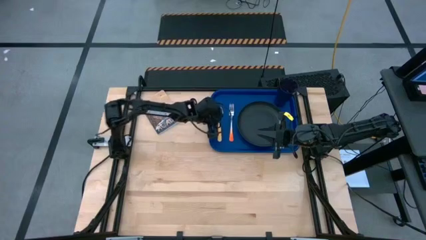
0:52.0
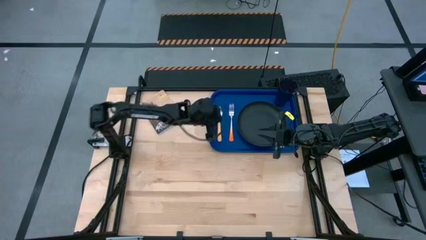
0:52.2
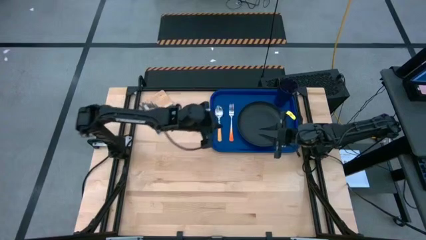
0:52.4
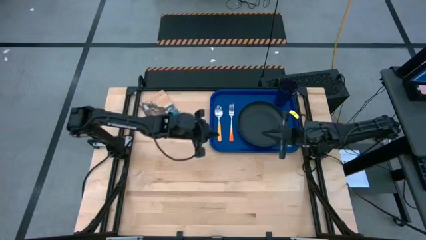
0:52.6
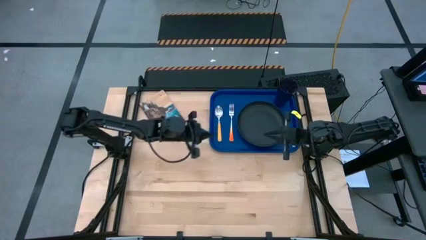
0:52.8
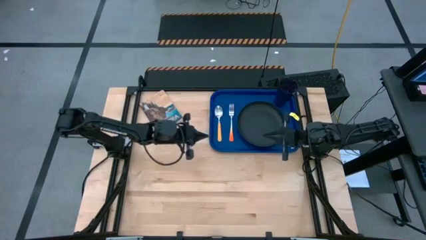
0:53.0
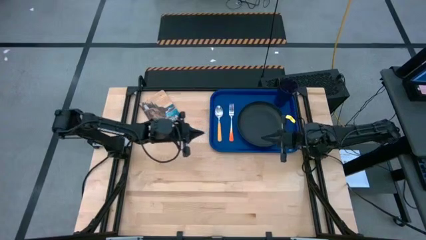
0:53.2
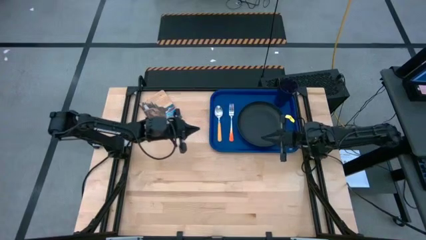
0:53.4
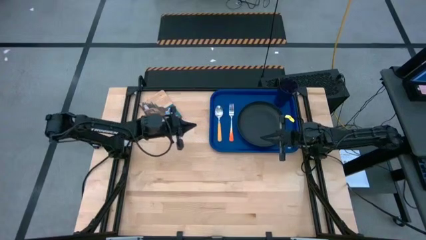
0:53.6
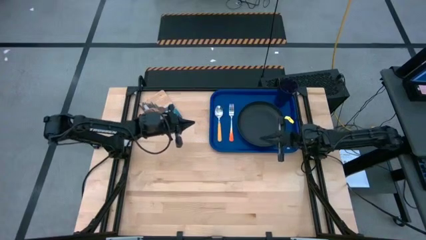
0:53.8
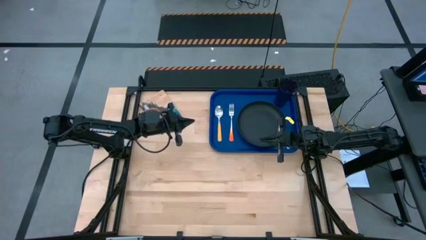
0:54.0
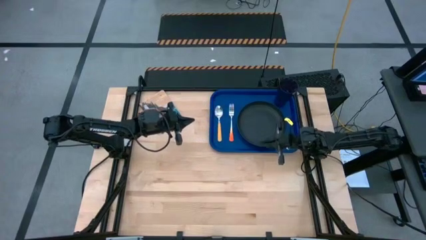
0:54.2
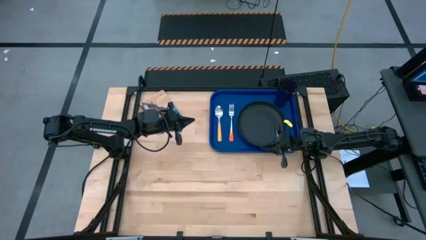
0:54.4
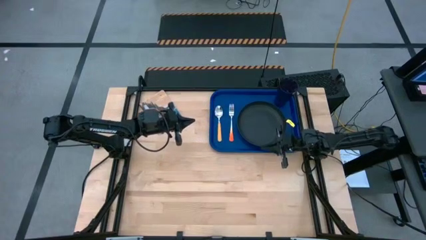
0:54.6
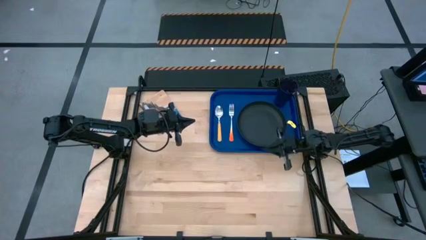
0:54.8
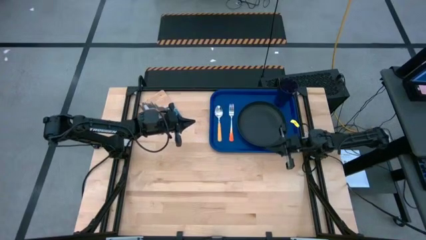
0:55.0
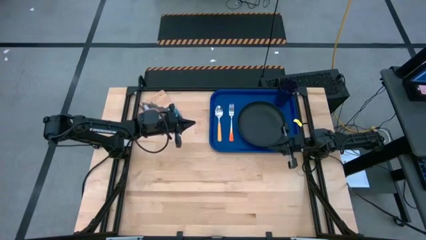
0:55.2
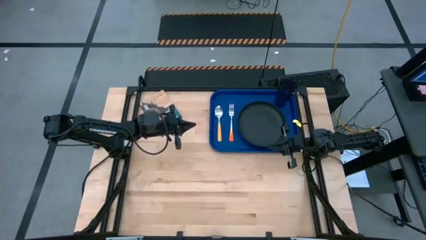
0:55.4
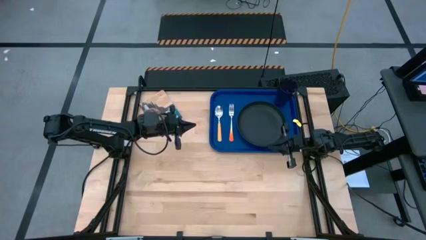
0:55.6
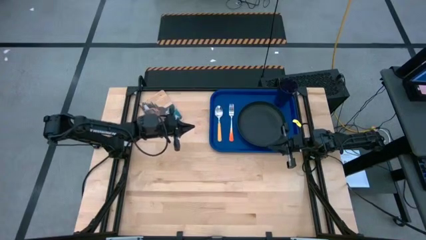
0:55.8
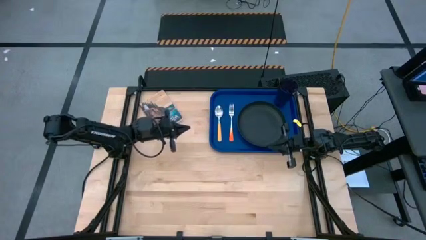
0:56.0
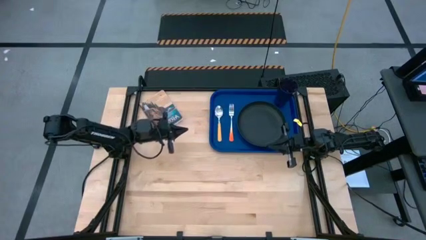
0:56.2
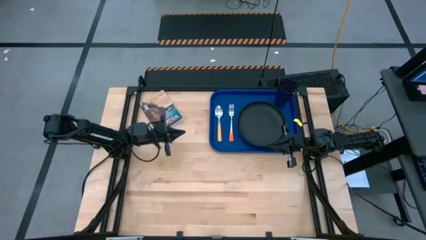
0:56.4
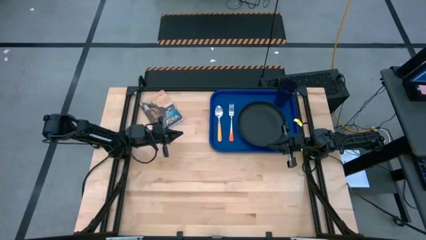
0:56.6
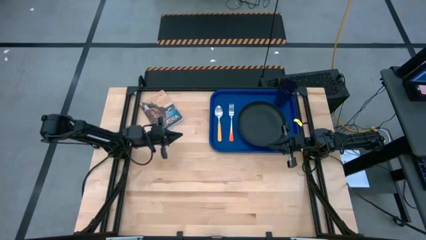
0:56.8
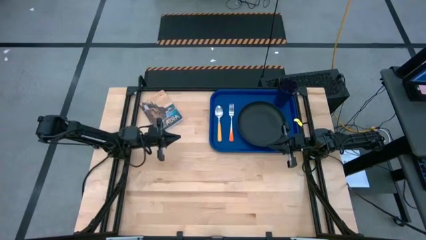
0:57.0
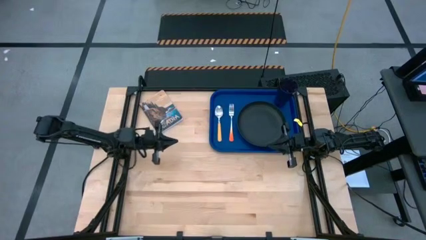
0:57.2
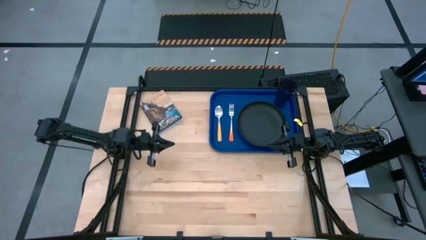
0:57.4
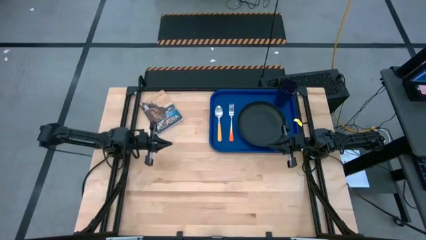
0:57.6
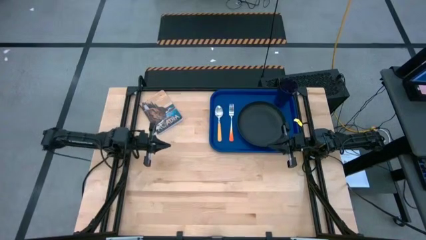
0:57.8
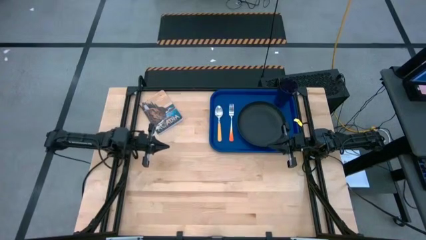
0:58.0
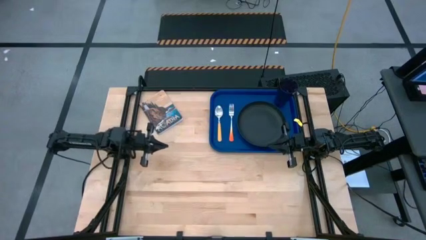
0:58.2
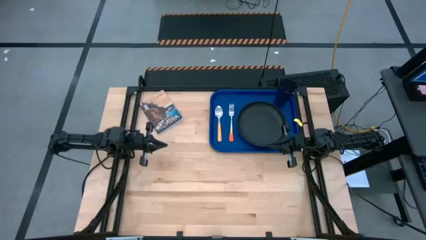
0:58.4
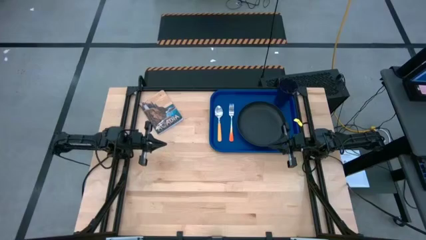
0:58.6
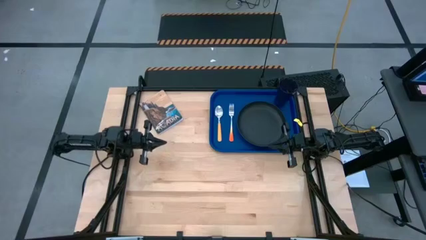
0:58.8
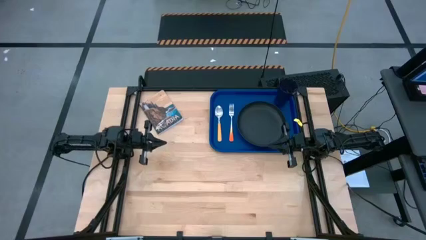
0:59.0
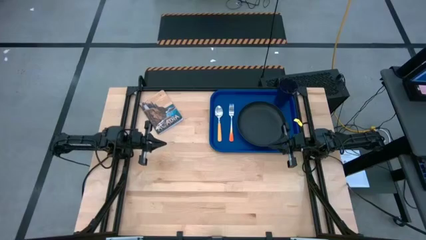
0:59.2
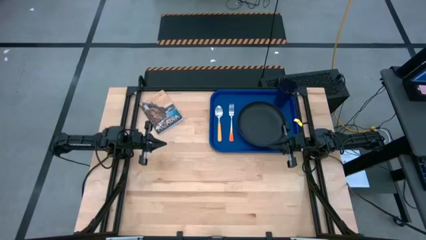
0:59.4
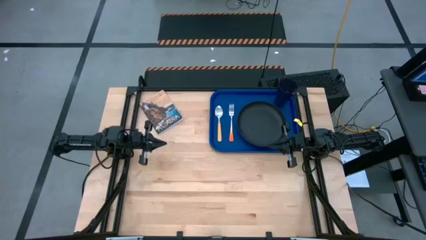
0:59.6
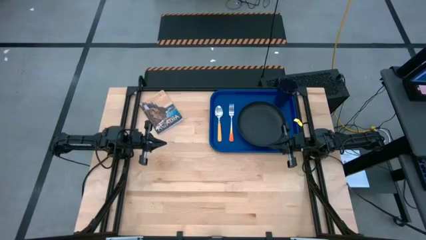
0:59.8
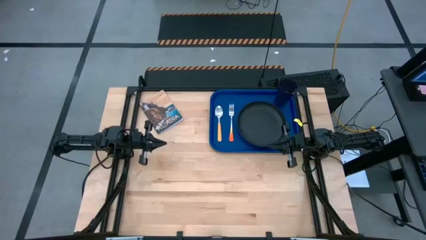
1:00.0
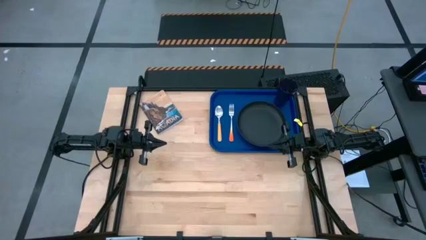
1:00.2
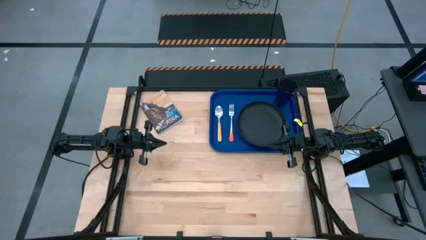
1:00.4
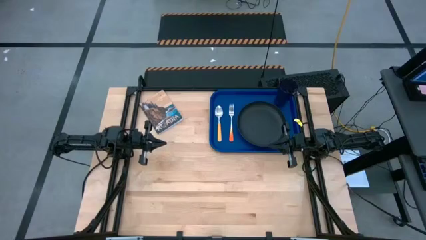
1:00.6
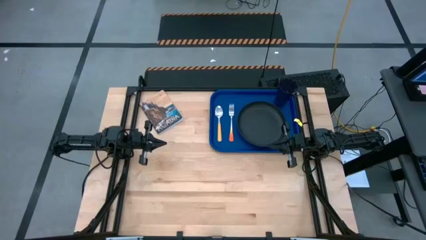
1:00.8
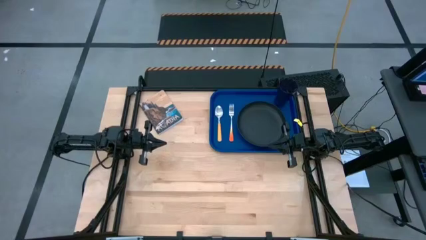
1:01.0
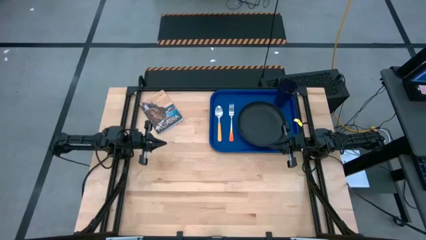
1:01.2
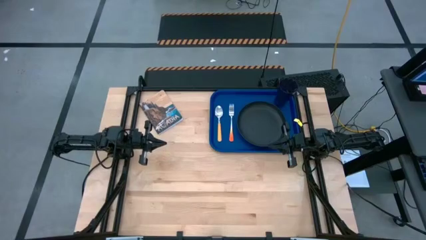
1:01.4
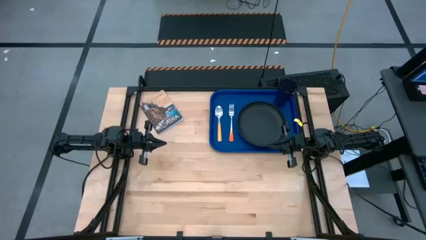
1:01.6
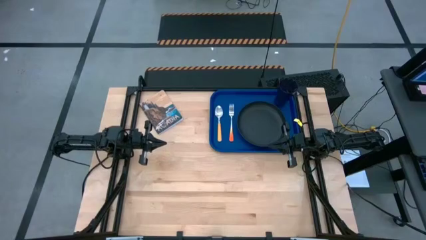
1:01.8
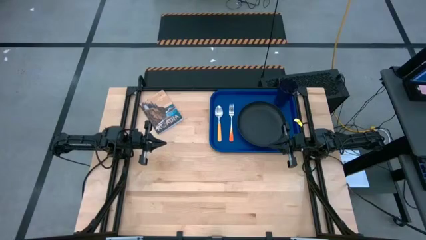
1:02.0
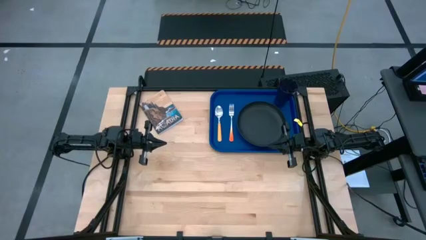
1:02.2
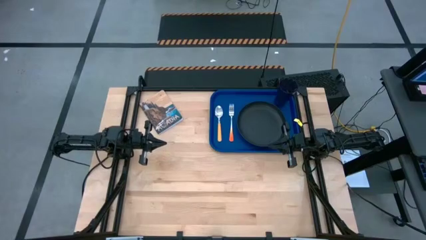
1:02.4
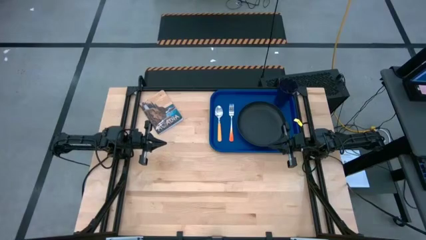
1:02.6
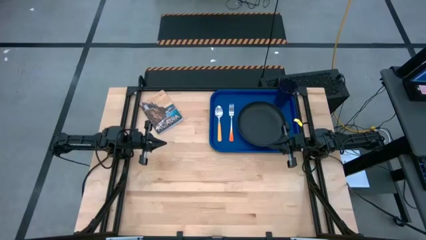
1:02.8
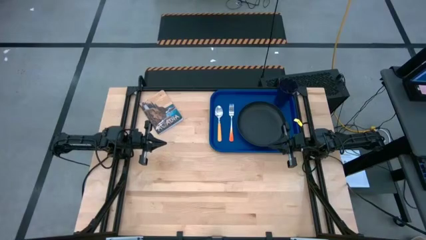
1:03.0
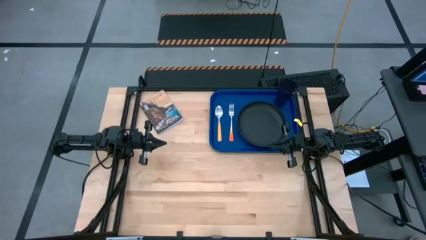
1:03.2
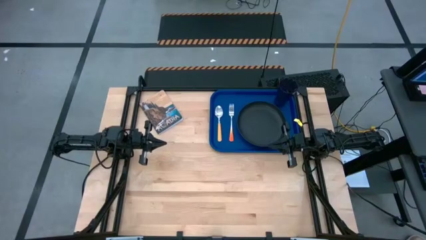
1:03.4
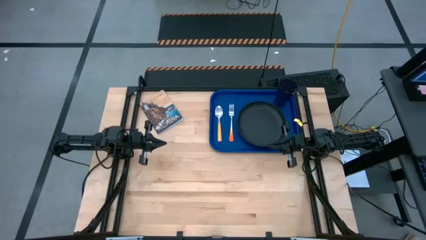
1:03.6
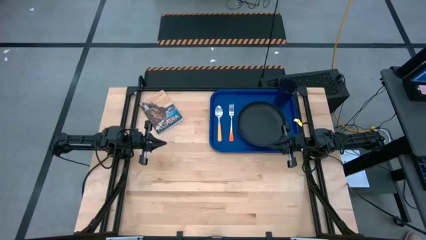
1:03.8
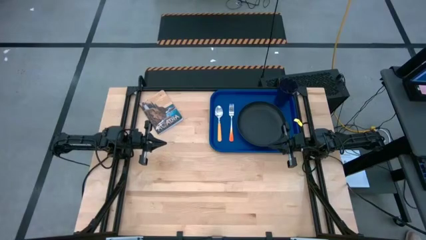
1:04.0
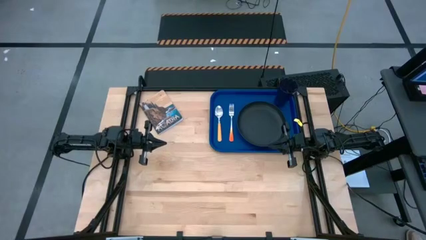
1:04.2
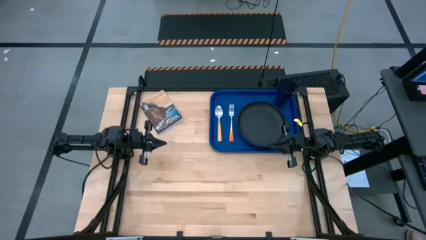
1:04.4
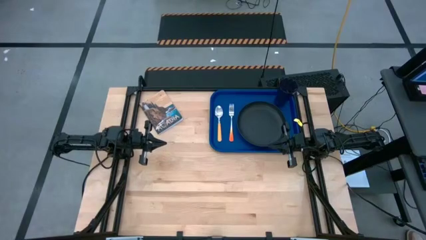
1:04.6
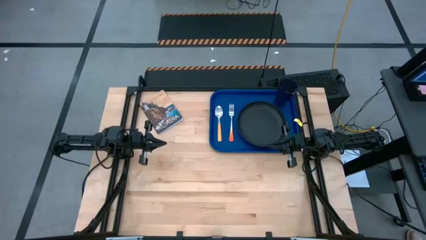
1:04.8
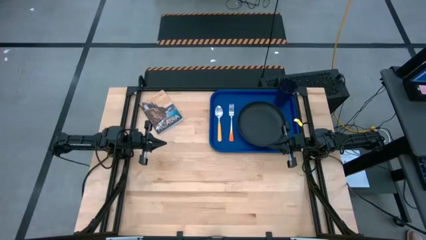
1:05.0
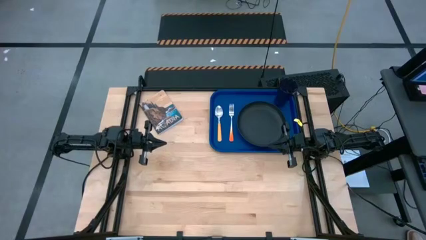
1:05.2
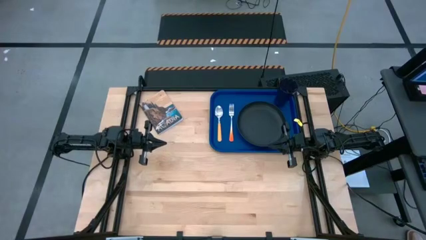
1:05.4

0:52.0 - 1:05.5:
Task: Pick and place plate/cup/fork/spoon on tray
Return to Home Position

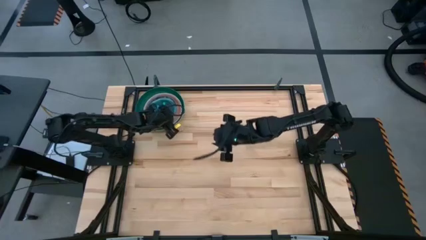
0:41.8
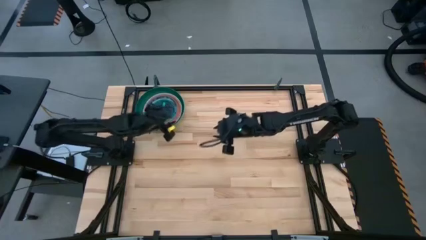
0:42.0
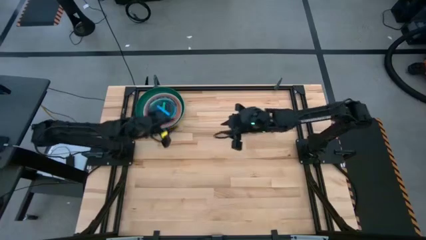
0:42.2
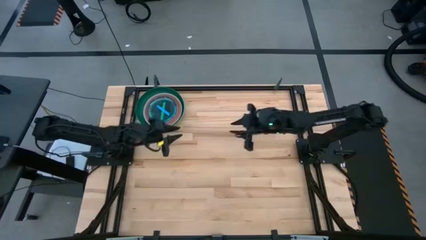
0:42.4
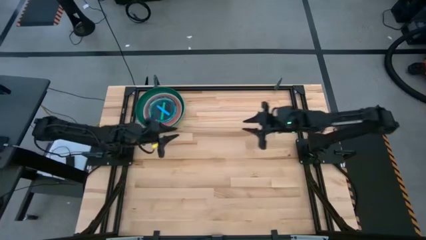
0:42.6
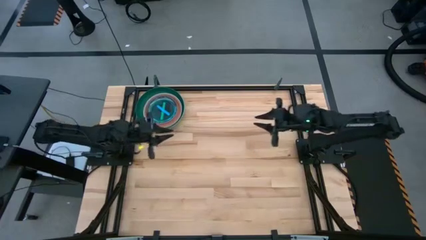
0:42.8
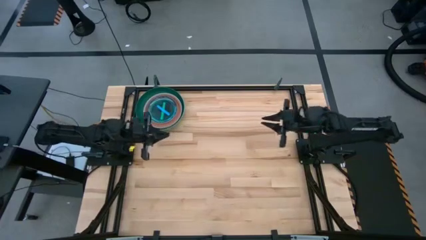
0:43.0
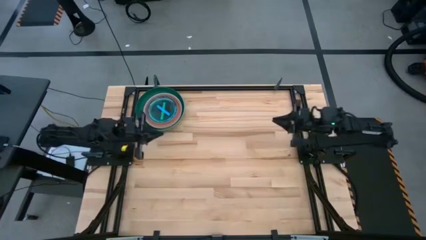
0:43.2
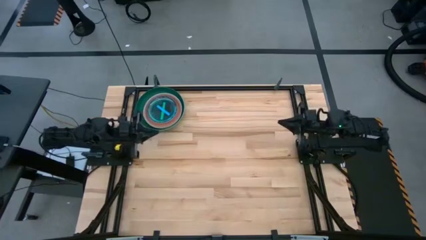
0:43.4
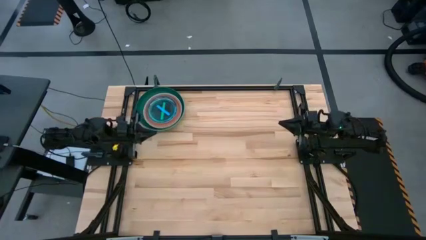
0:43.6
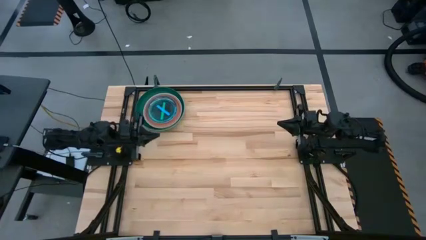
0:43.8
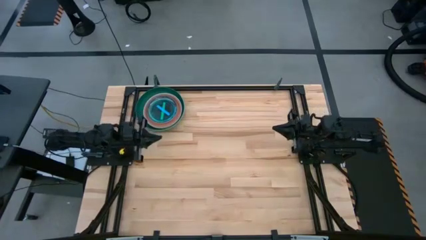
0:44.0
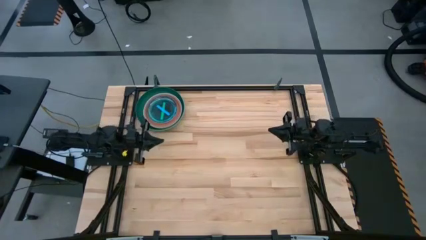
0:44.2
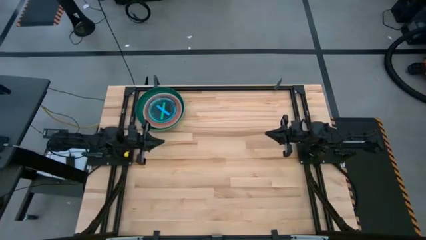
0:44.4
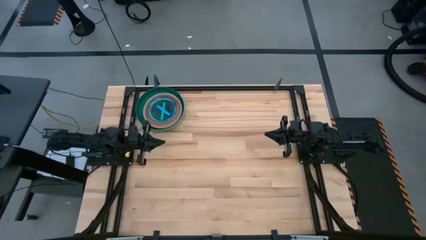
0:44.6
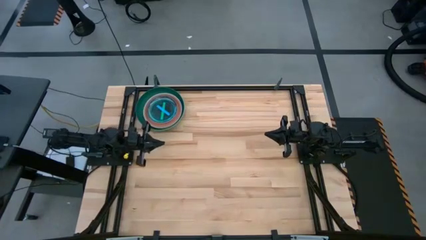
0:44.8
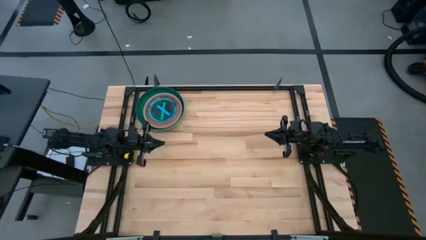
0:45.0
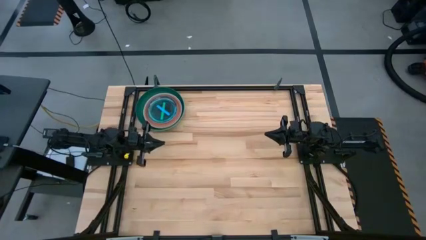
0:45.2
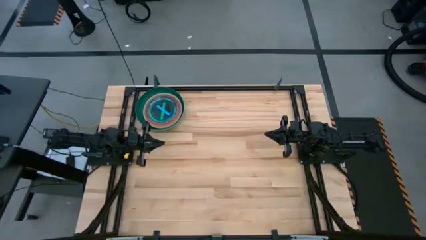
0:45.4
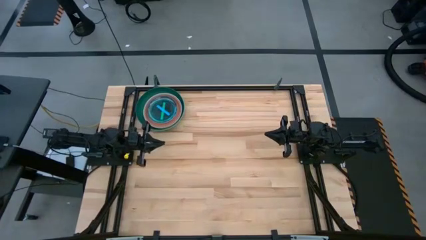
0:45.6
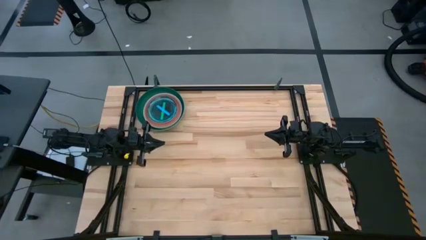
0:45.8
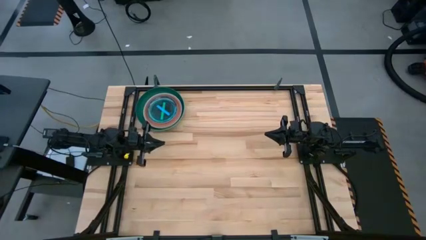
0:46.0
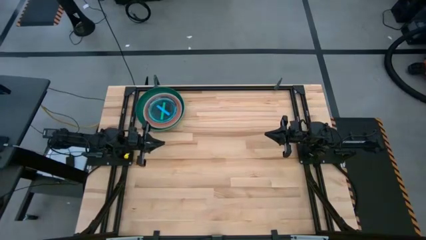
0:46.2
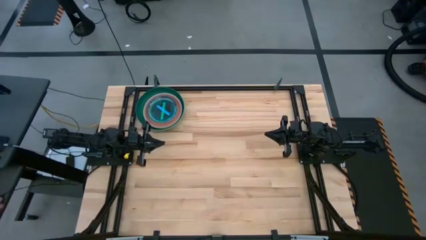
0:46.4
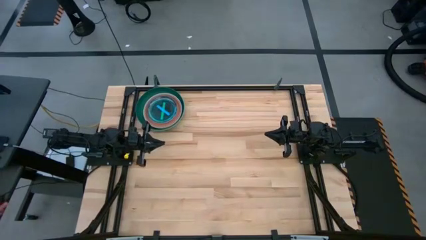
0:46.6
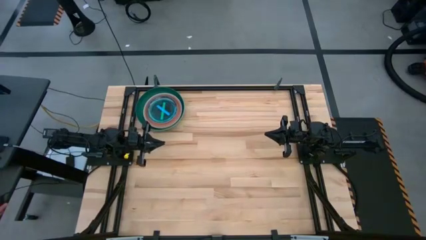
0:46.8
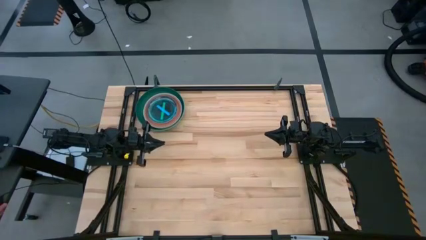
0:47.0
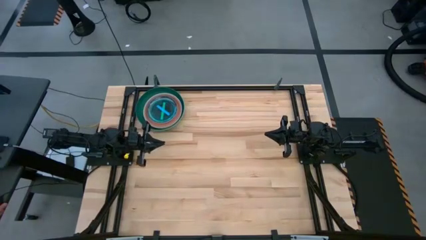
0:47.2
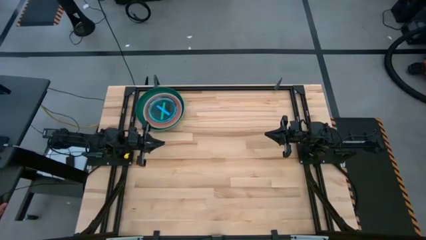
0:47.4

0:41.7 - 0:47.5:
Task: Stack plastic plates
Return to Home Position
